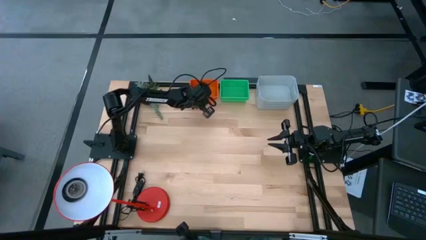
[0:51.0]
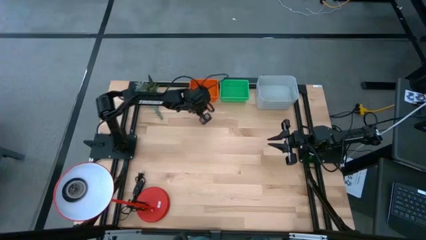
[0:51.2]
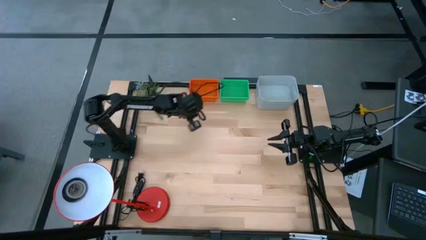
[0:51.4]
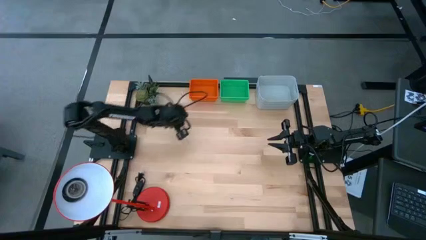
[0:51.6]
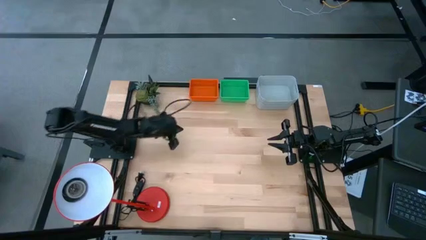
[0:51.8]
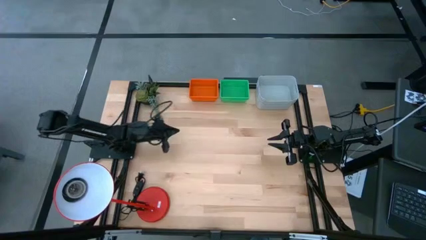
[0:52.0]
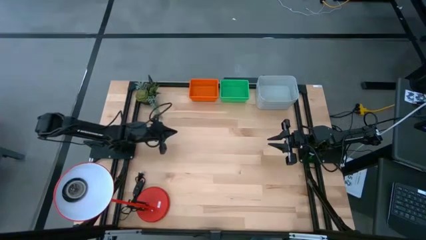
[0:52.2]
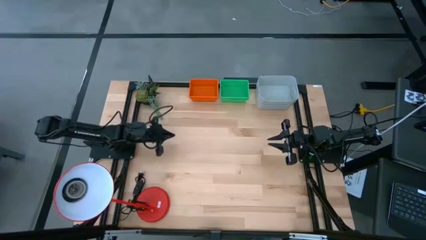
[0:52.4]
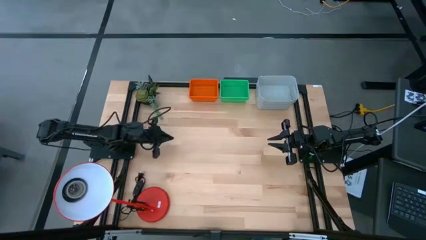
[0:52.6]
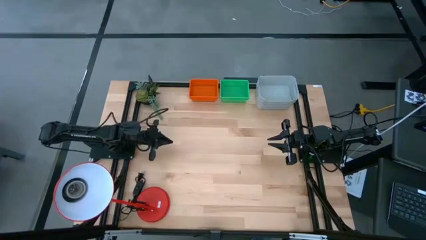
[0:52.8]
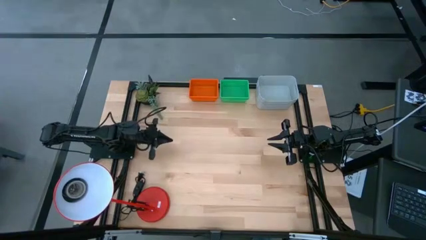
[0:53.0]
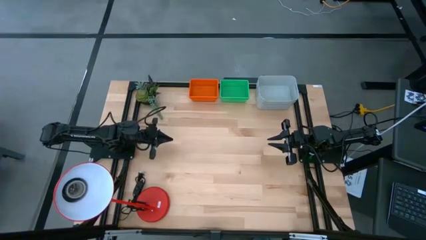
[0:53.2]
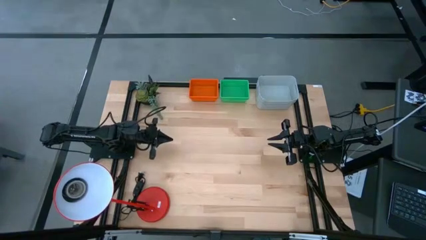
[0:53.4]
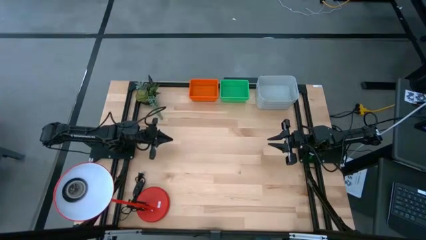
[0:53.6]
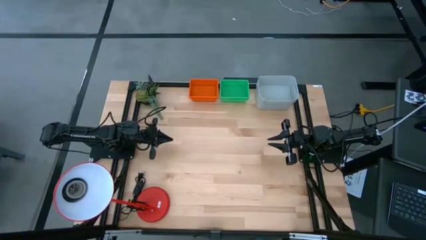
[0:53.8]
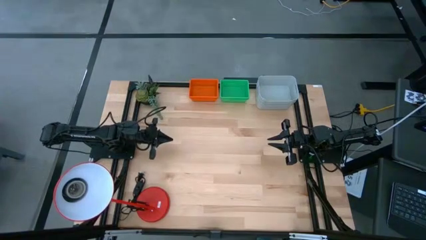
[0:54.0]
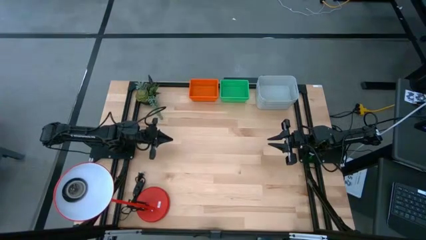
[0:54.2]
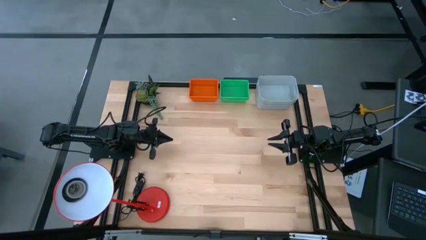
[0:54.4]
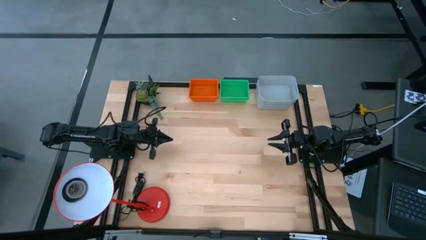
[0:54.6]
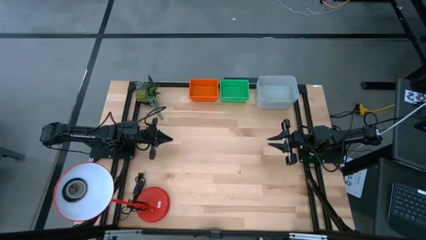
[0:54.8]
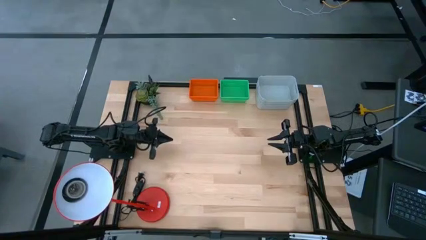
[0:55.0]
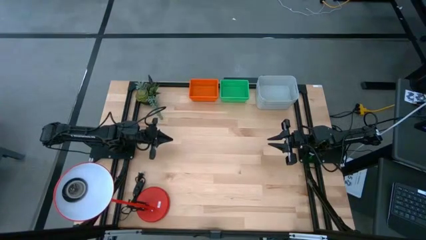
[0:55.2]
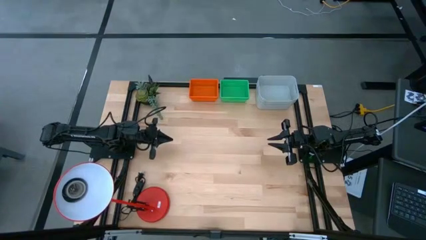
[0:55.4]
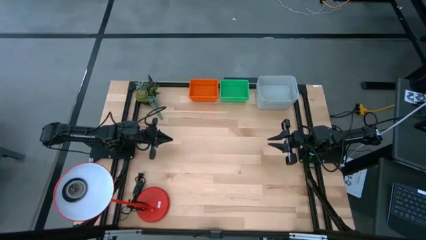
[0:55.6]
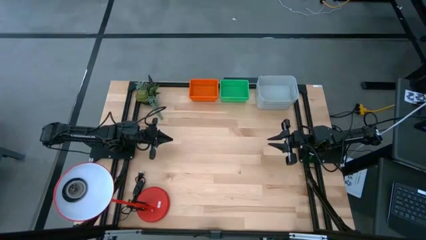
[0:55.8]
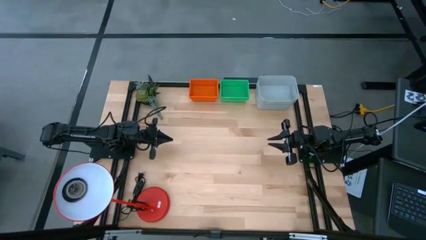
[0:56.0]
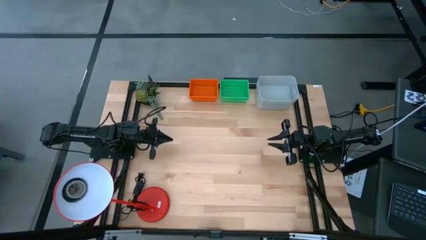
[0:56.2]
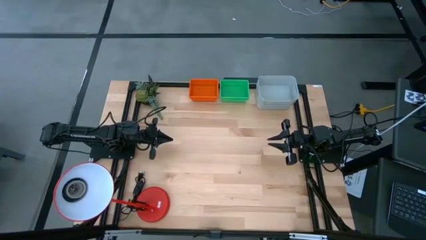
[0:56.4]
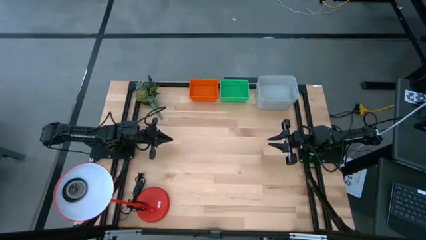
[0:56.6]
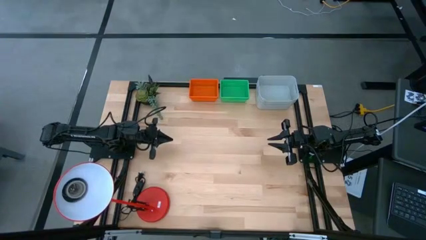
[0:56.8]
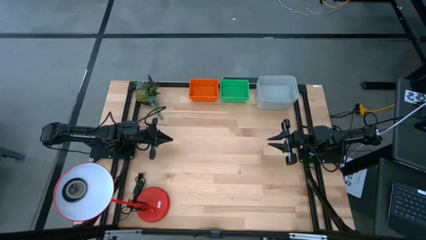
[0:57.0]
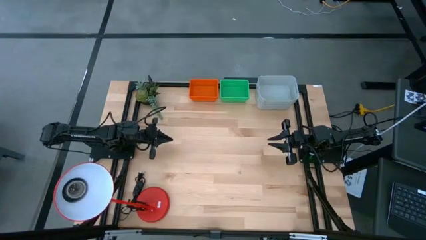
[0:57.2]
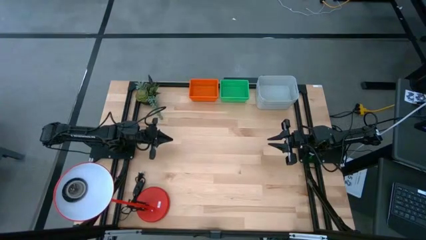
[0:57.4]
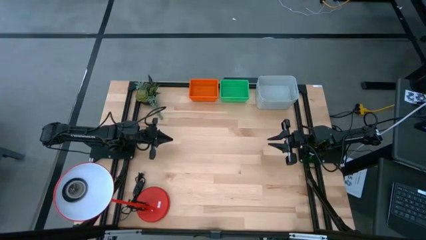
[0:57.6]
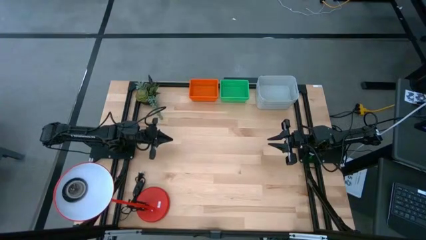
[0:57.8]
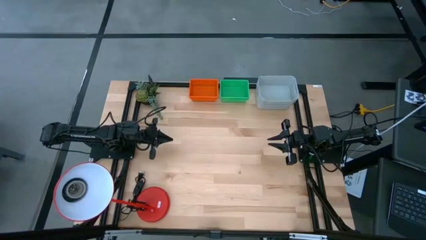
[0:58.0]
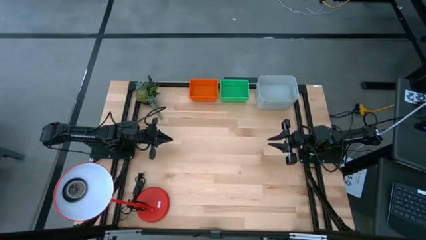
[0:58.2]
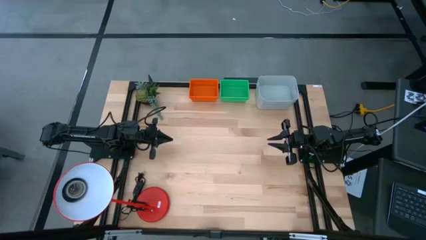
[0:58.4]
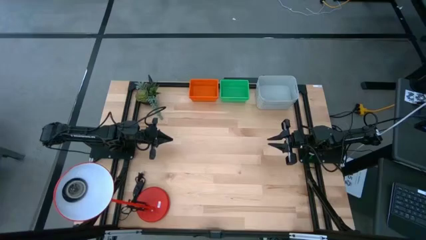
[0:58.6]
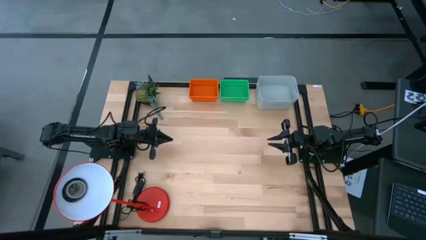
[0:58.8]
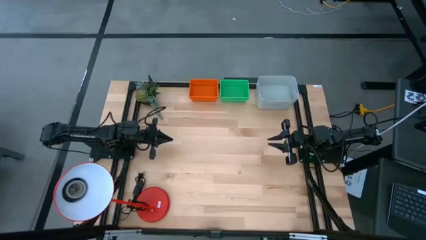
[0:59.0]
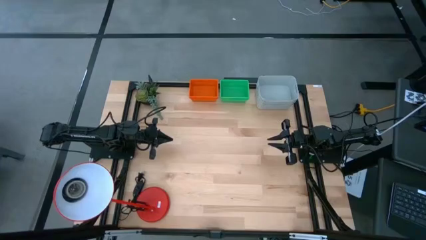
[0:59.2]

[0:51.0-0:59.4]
Return to Home Position
